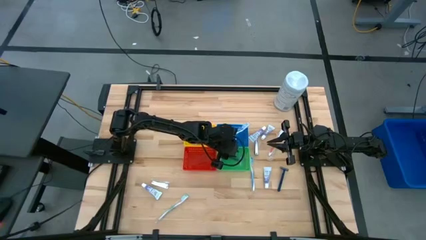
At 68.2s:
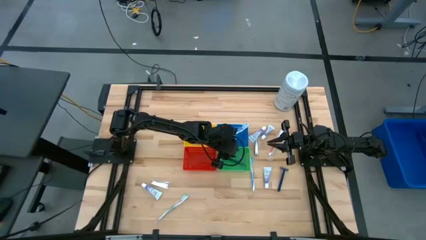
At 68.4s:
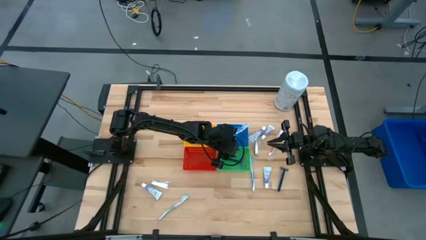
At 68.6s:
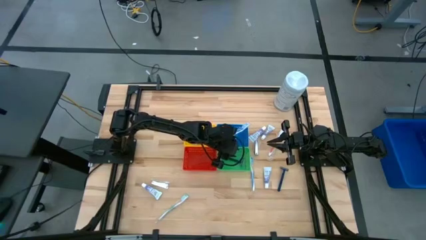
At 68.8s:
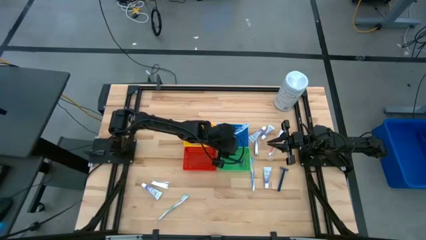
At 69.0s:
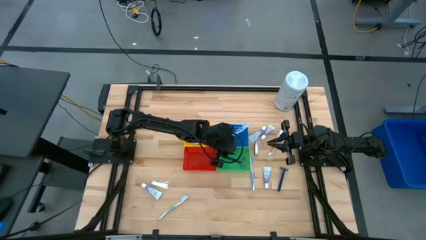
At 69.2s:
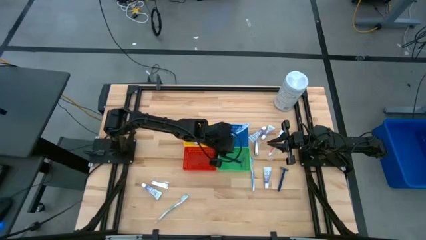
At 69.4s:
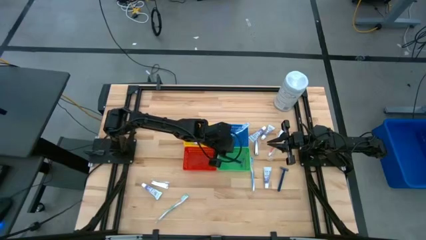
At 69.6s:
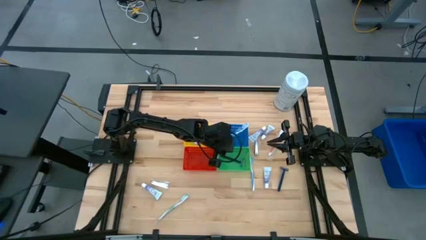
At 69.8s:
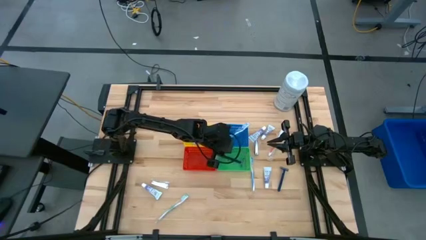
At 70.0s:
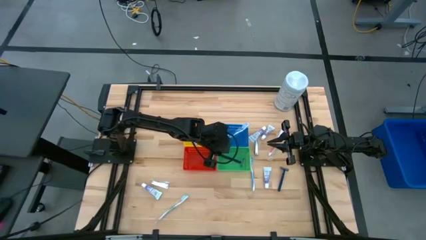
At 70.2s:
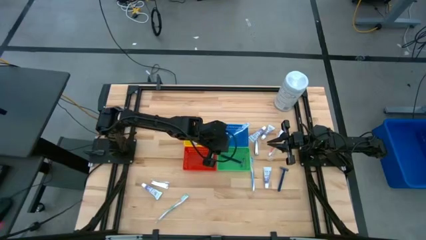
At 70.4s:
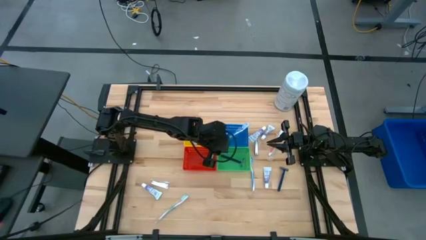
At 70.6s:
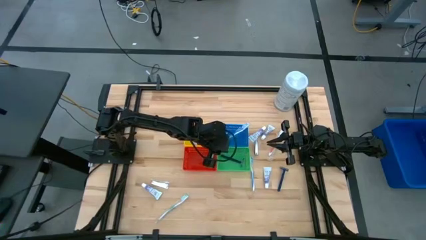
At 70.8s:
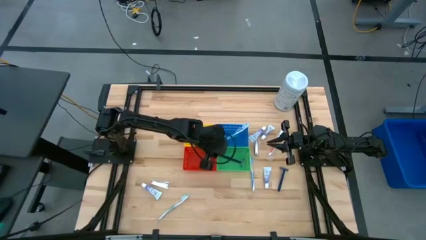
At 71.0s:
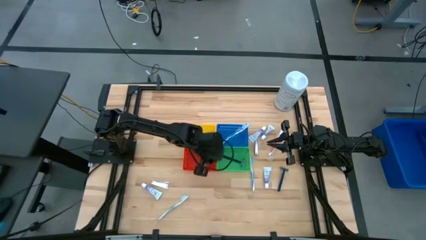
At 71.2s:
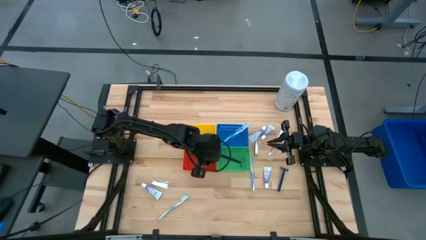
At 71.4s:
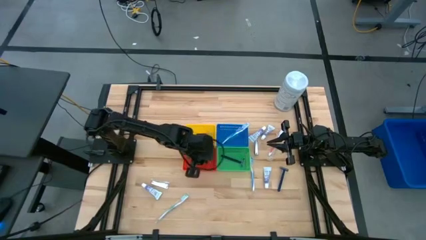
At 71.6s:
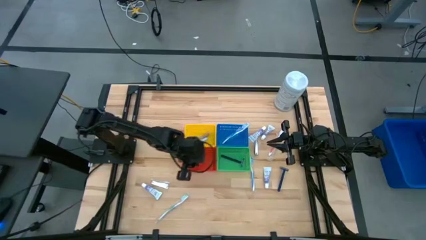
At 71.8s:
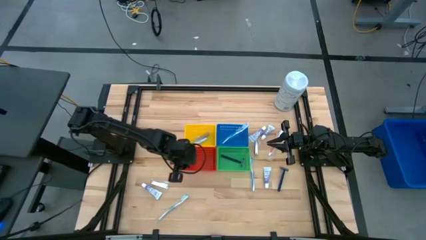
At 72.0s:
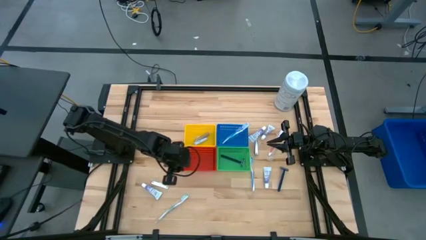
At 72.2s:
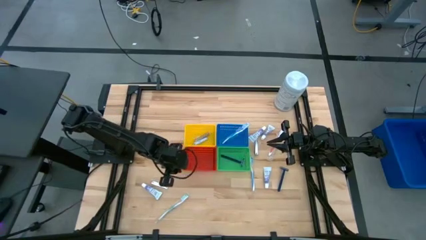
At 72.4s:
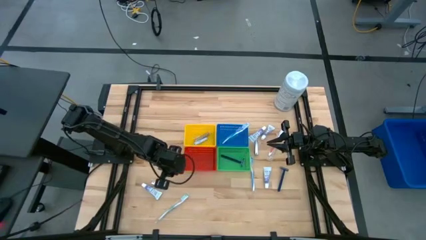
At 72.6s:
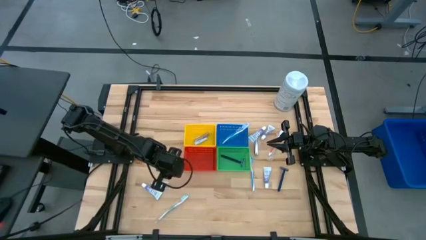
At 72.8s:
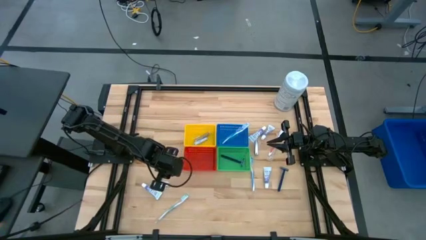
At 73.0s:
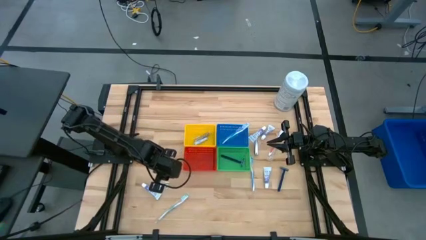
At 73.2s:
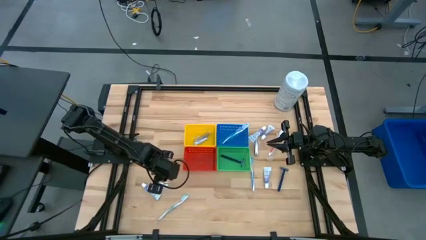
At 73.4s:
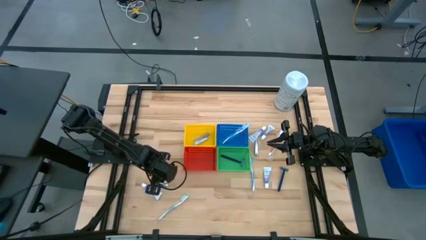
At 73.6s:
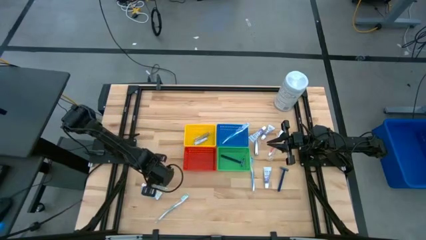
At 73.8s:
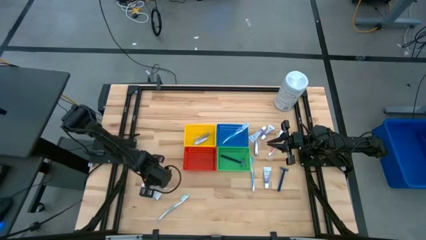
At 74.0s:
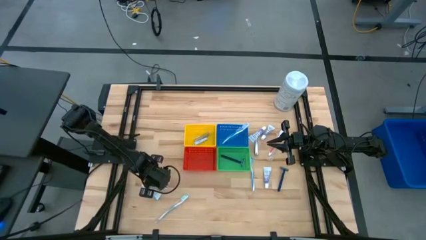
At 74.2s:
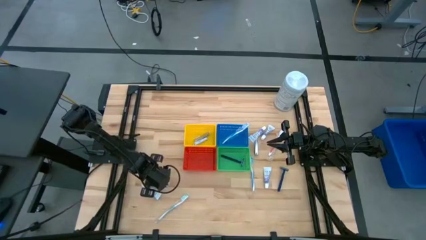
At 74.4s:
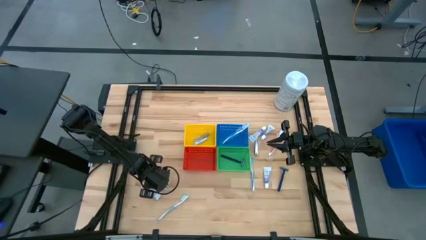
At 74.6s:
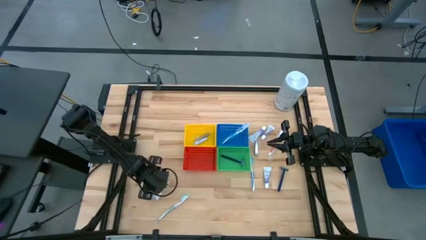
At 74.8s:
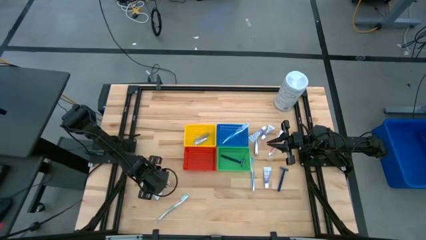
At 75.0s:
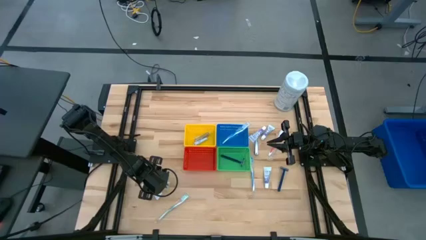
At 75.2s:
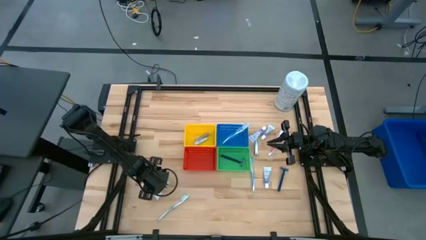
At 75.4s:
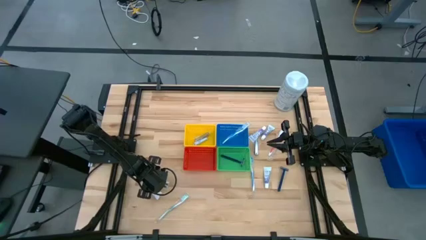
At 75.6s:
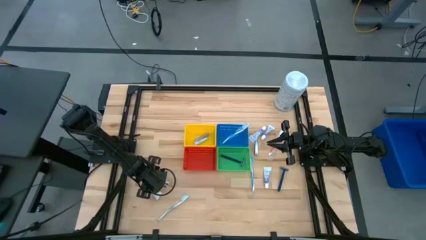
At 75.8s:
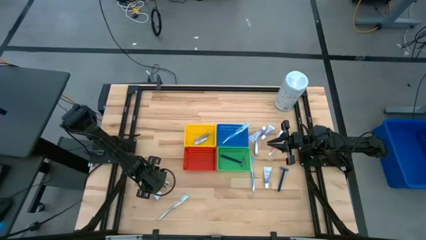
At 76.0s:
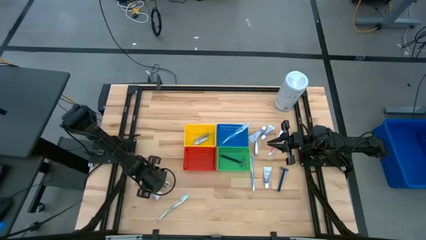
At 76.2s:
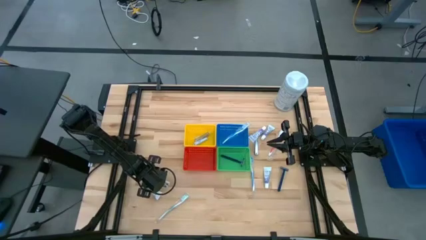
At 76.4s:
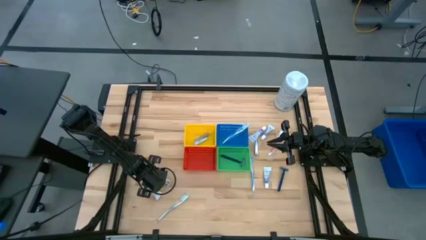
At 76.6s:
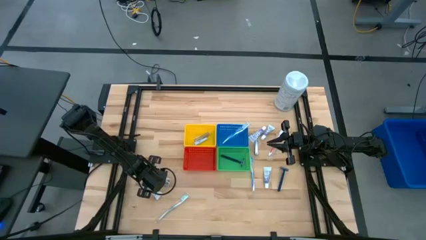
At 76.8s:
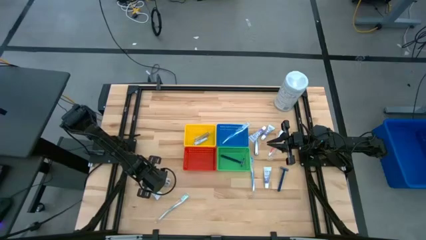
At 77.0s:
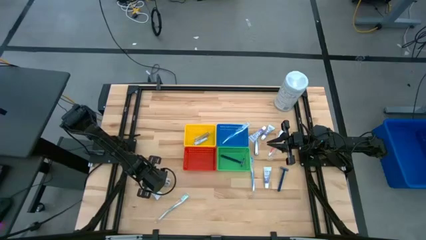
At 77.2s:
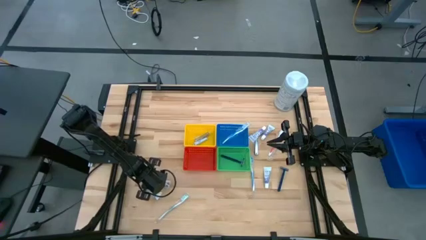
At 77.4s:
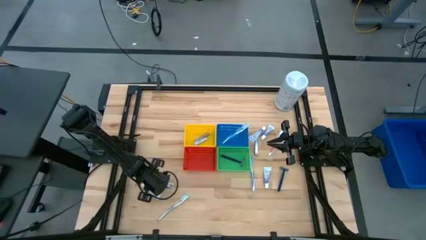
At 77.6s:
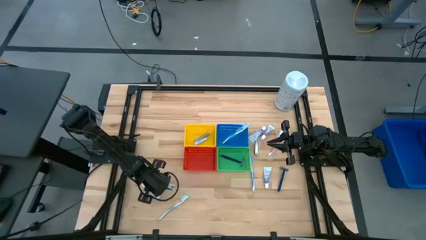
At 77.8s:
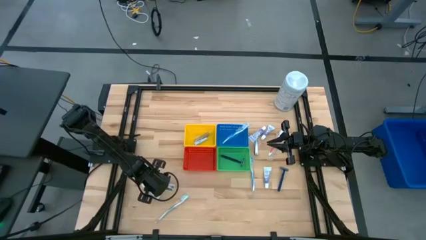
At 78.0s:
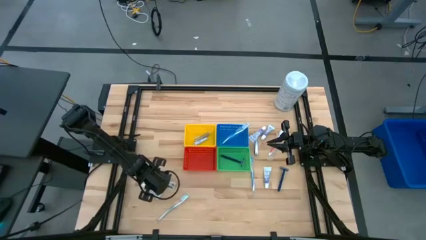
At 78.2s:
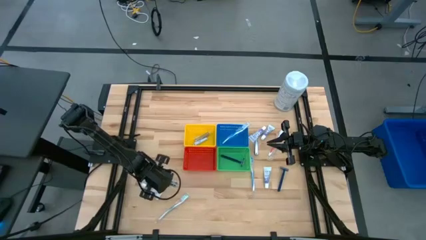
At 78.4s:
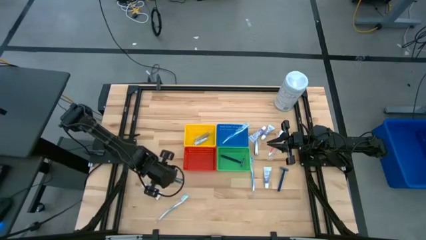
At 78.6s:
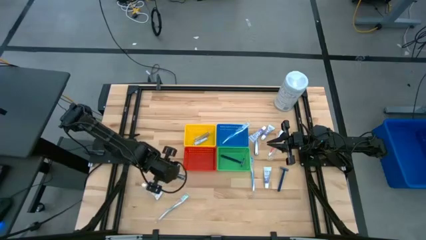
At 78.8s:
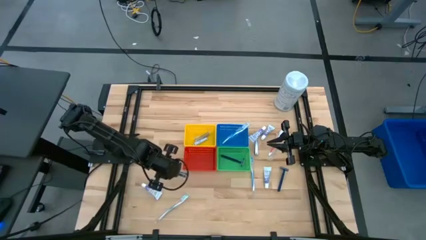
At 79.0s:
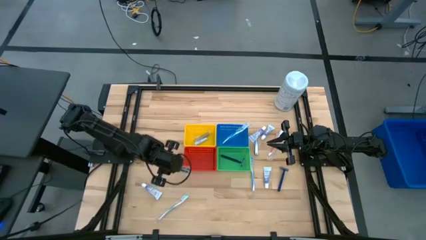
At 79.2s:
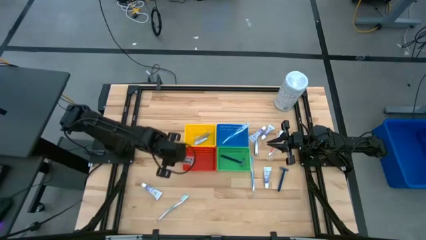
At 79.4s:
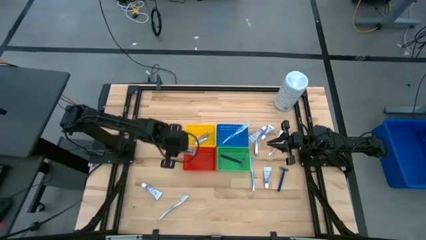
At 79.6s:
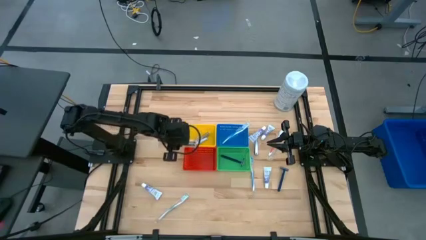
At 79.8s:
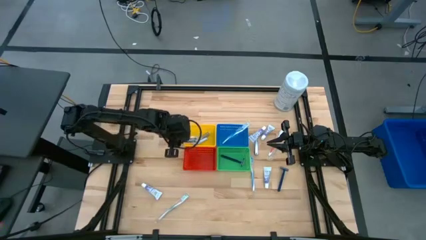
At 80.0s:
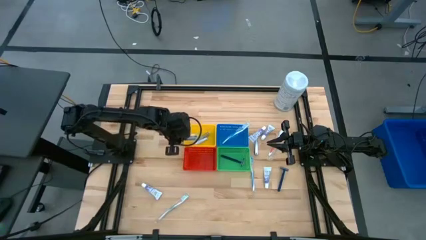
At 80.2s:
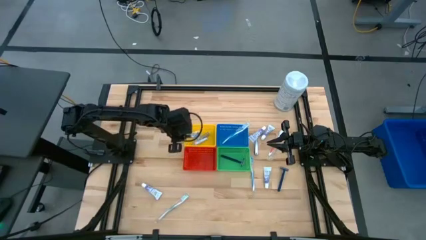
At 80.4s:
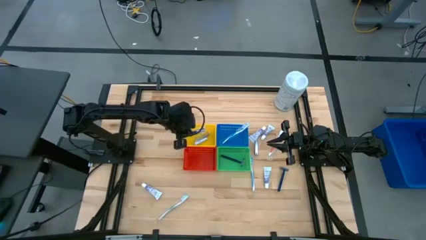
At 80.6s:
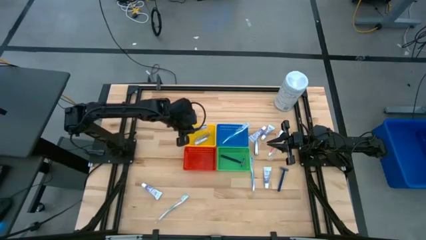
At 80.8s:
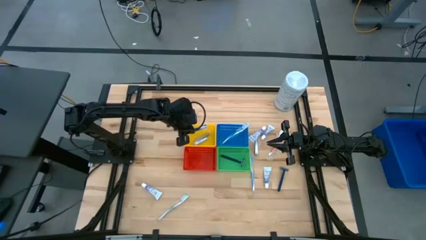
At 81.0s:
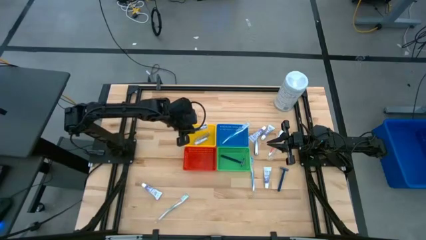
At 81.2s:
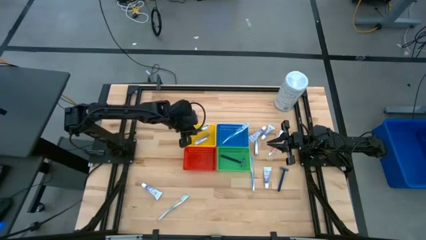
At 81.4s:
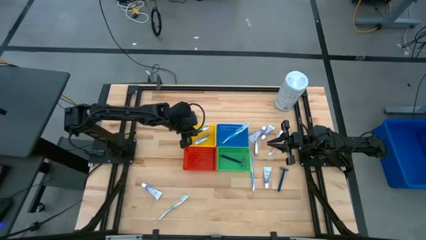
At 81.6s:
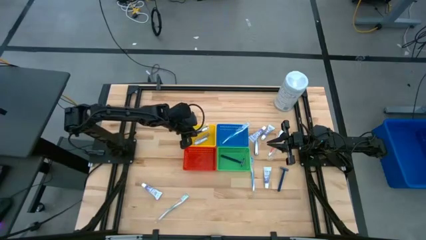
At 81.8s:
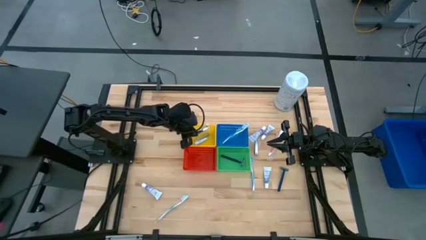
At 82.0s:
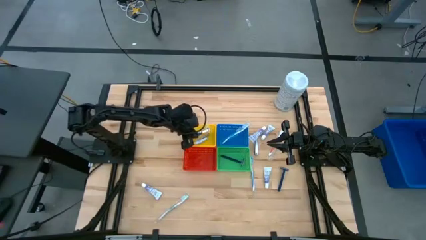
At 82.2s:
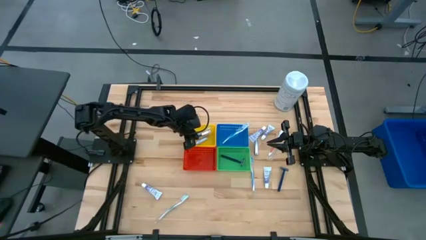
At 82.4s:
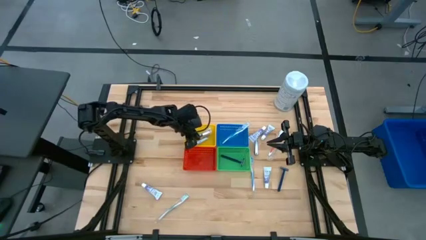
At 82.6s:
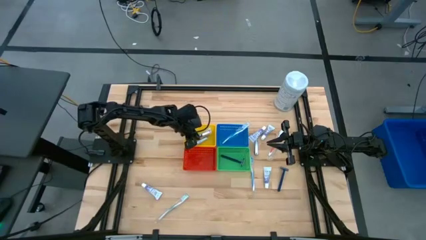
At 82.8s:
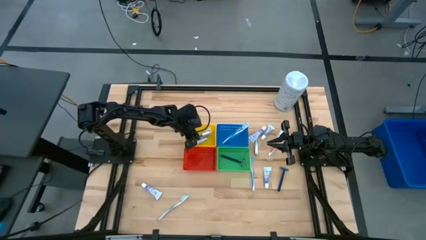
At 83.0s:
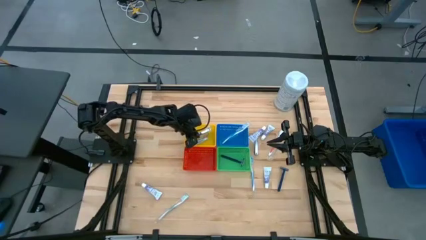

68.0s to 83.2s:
Task: Pick & Place Travel size toiletries
Put the bottom left nail cutter into the yellow bin

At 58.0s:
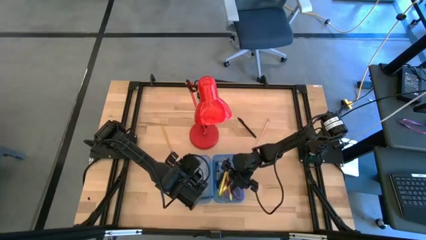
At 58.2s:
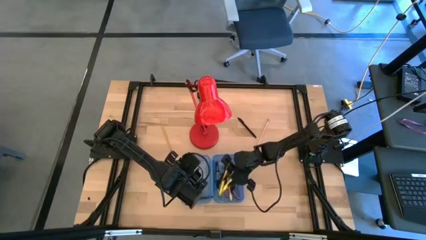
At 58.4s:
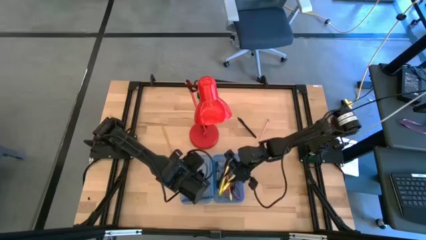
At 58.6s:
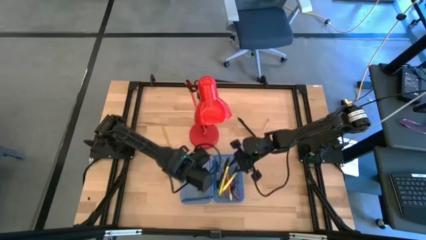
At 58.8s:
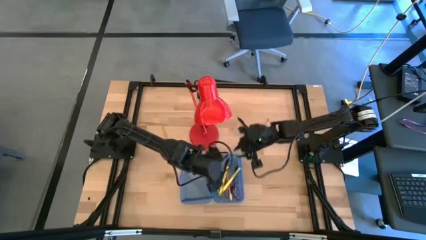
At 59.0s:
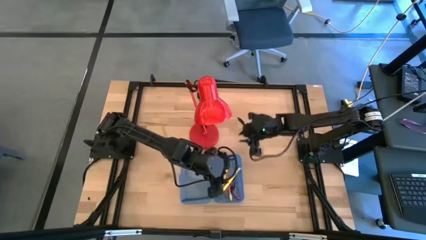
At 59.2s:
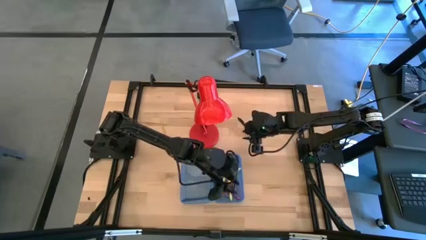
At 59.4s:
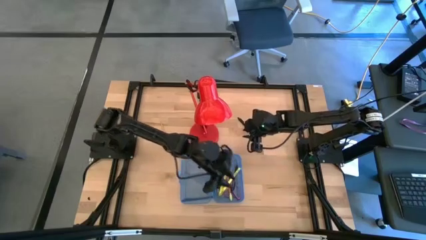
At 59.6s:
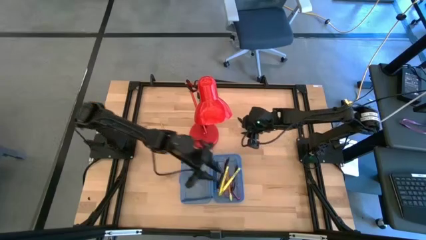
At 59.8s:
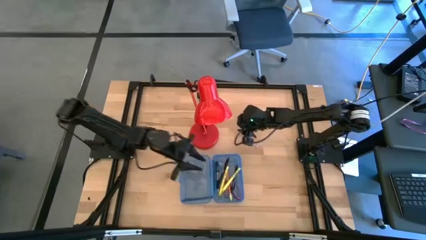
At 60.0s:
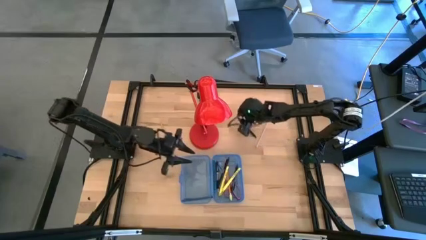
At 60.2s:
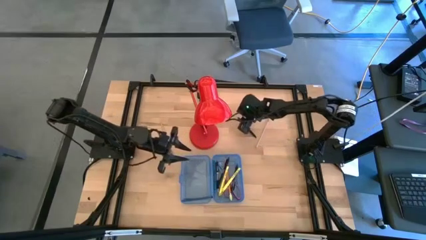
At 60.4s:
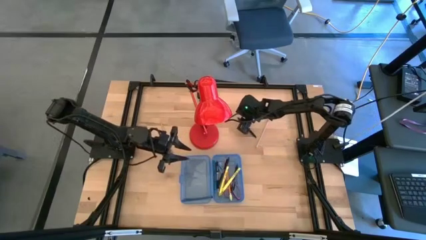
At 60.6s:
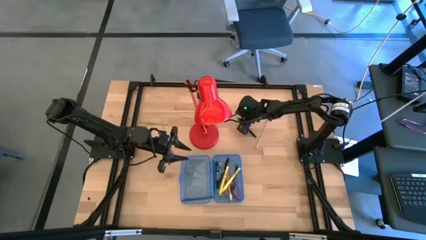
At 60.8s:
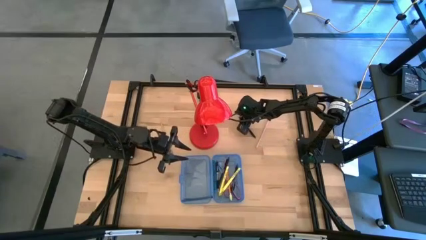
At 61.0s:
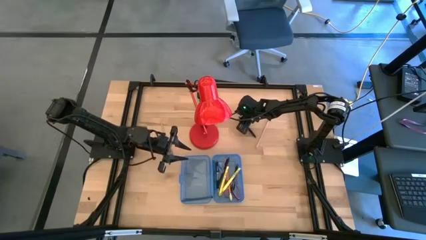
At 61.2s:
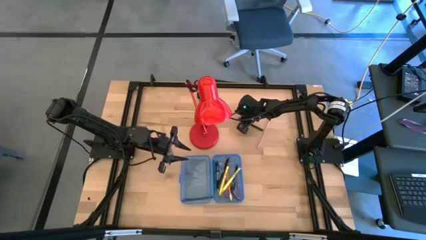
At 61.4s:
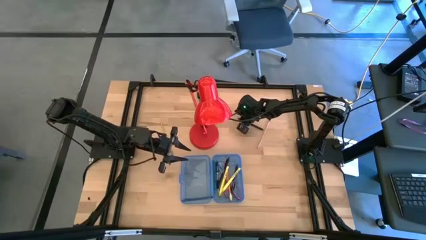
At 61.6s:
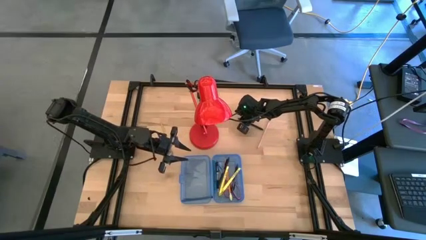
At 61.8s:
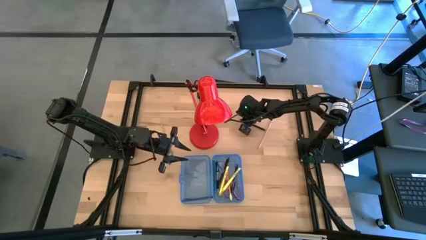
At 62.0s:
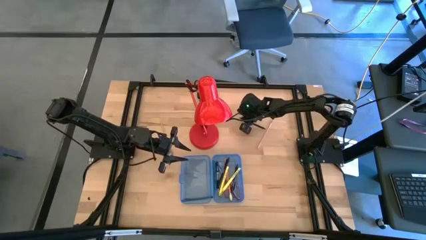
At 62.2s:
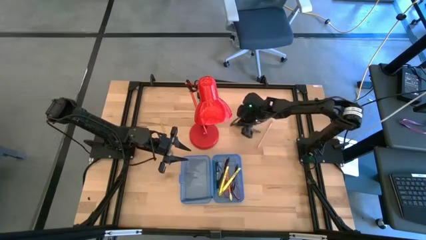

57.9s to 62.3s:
Task: Pick & place school supplies into a supply box
Put the top black pen into the blue supply box
